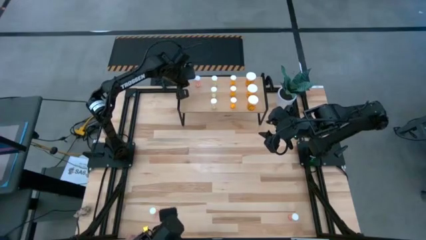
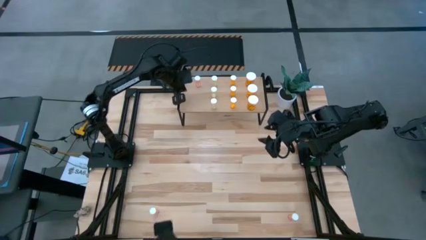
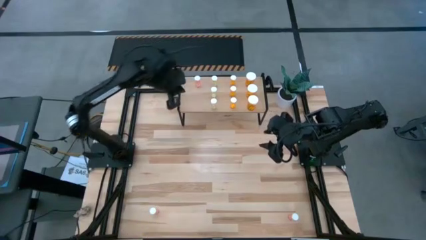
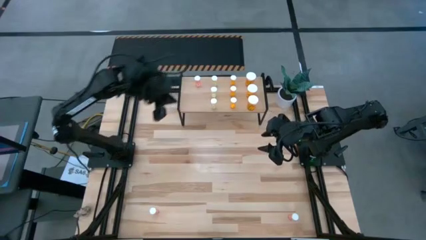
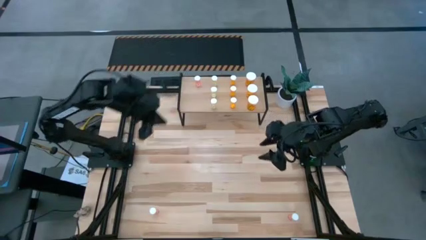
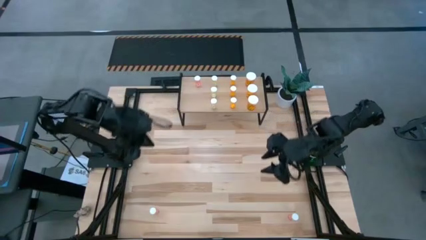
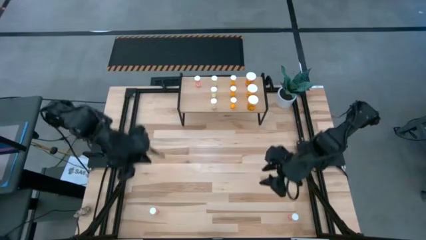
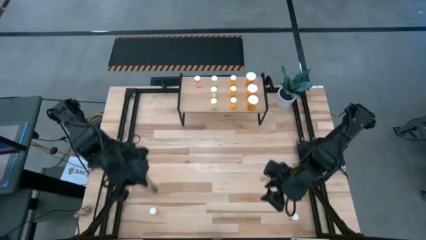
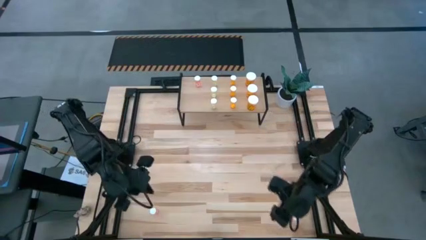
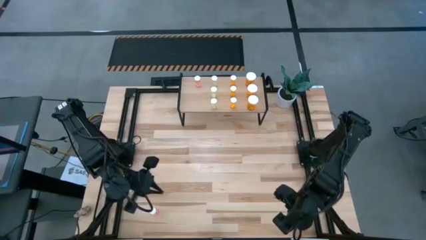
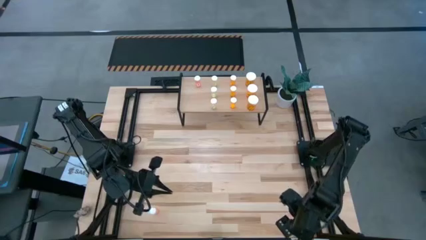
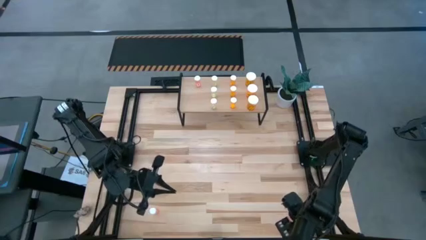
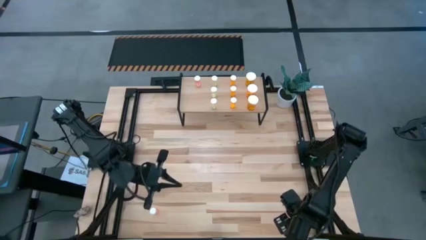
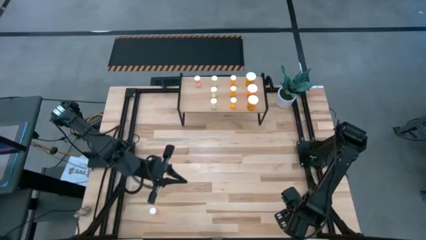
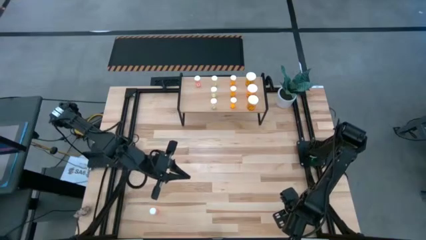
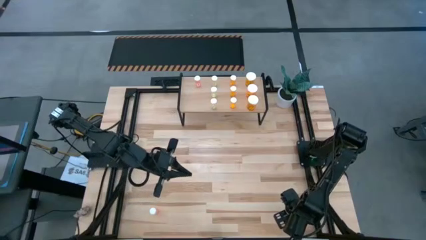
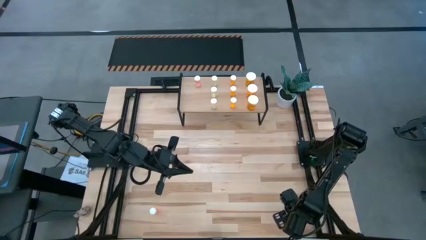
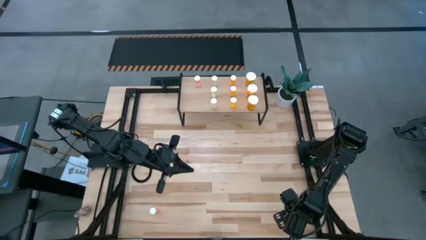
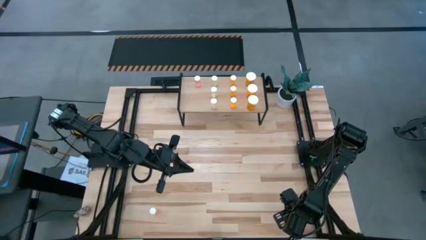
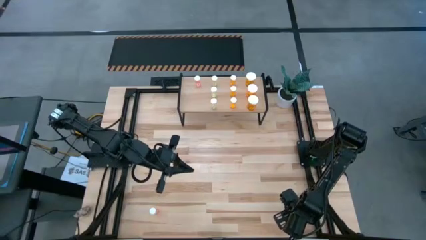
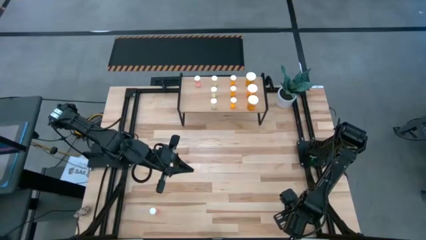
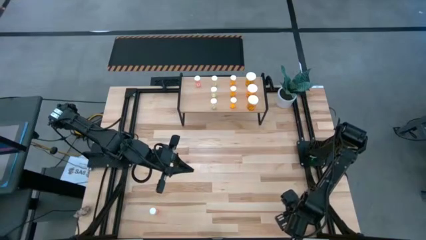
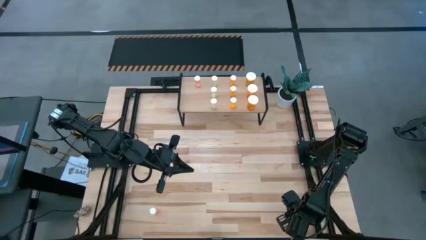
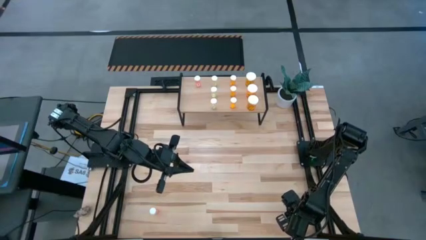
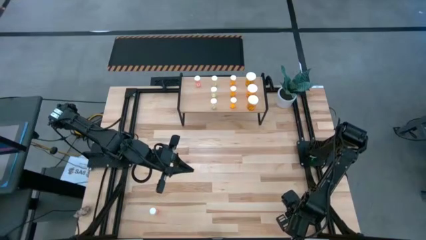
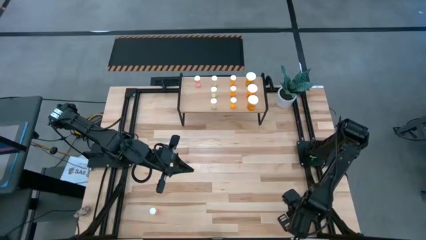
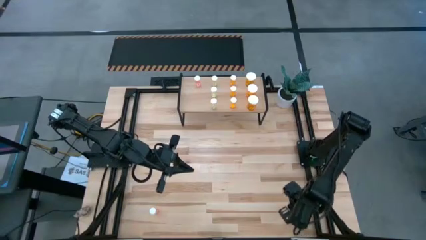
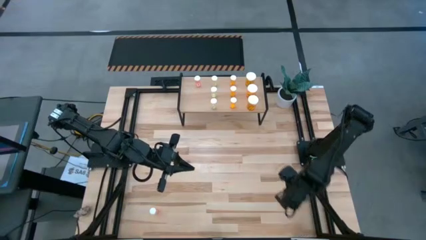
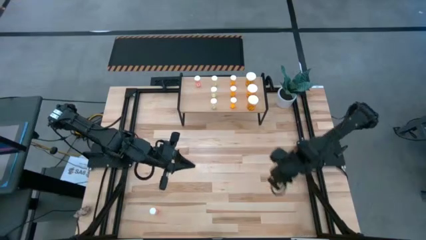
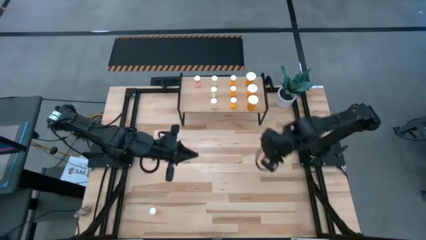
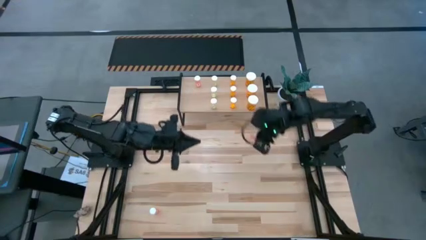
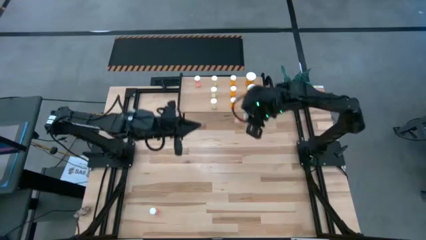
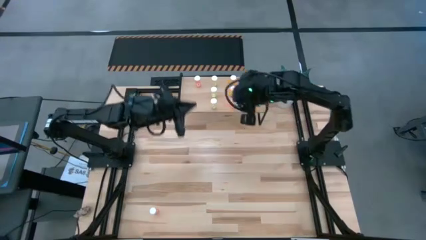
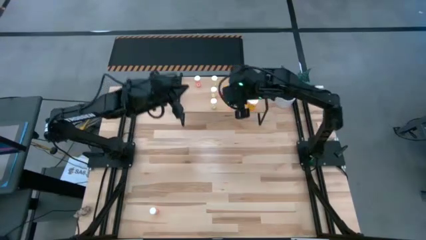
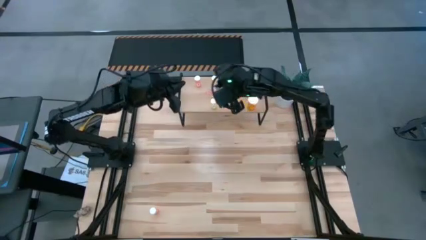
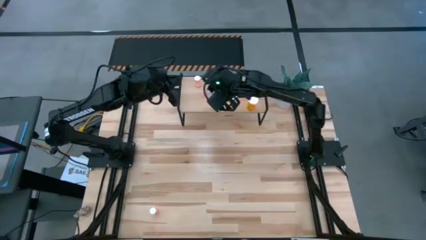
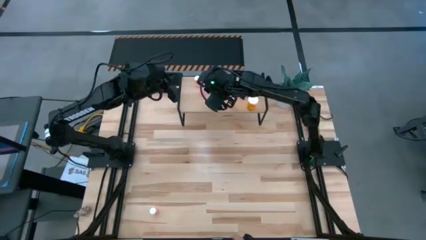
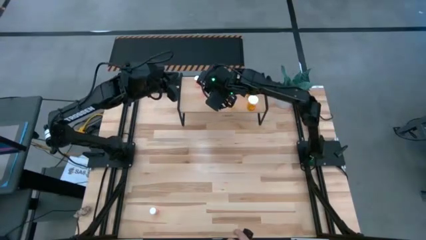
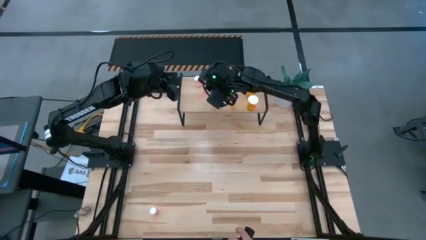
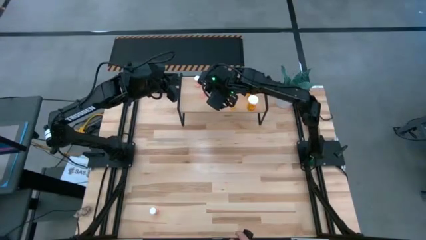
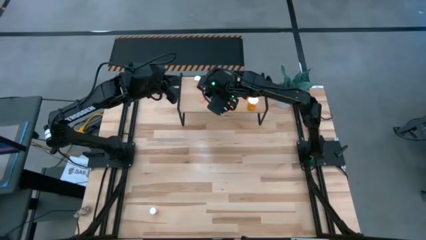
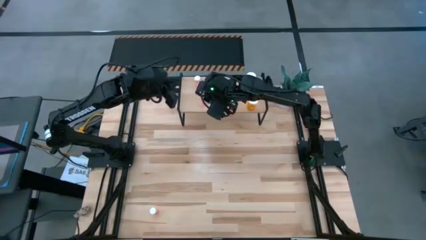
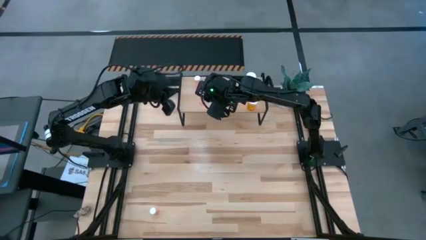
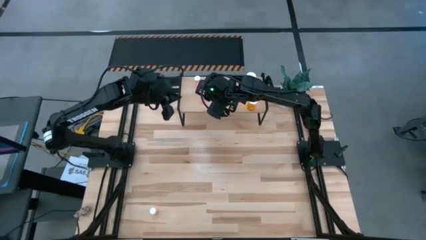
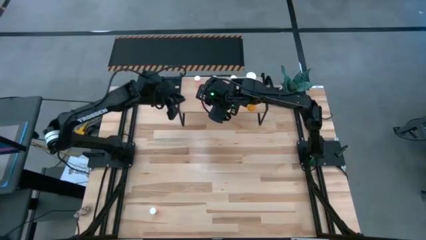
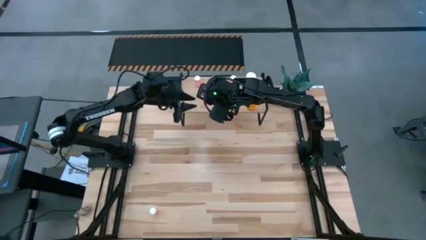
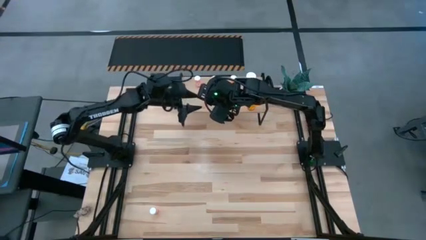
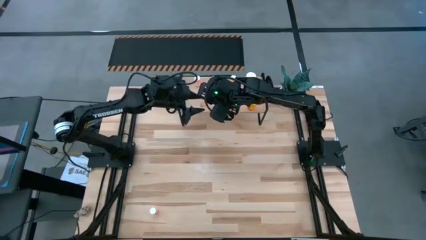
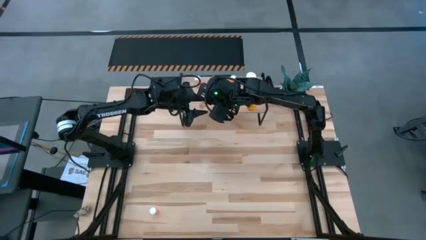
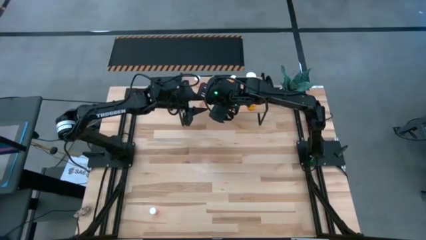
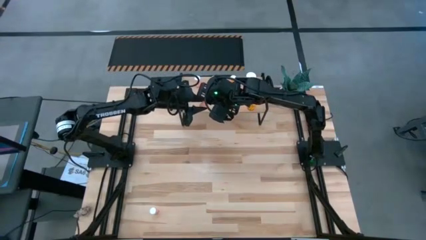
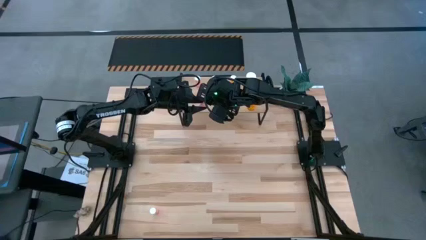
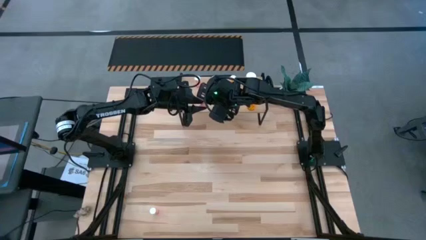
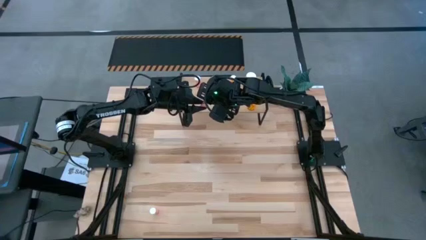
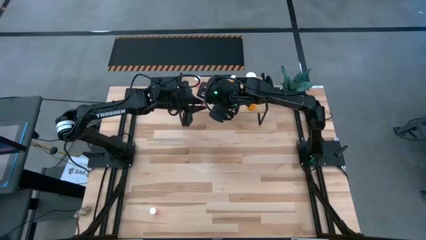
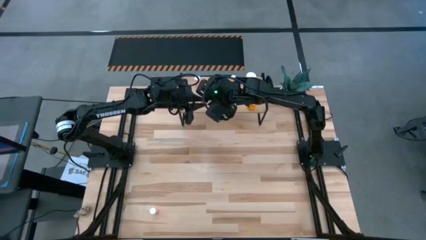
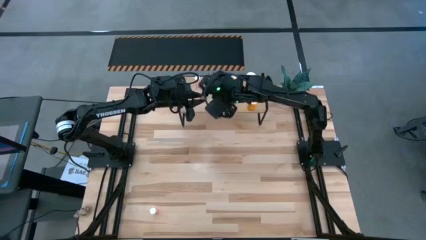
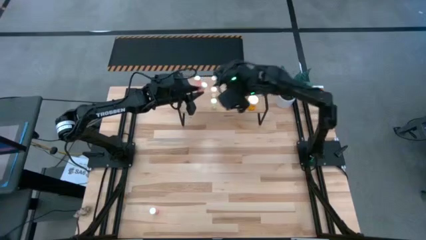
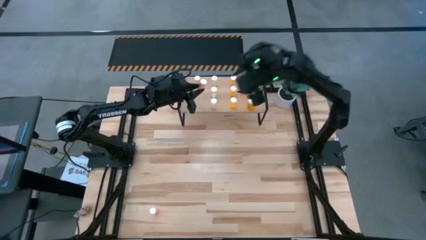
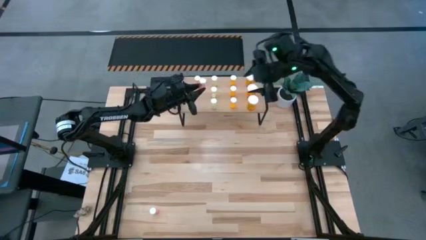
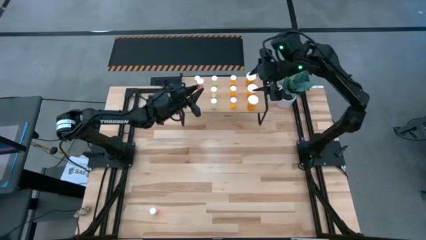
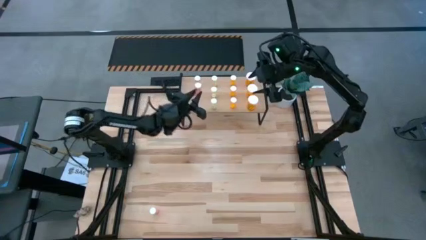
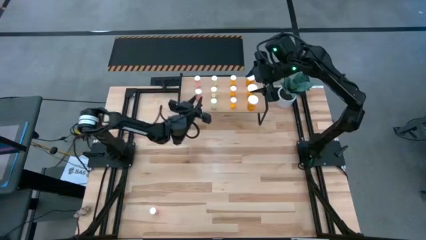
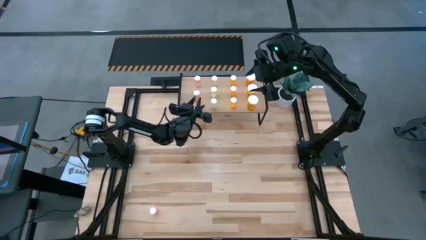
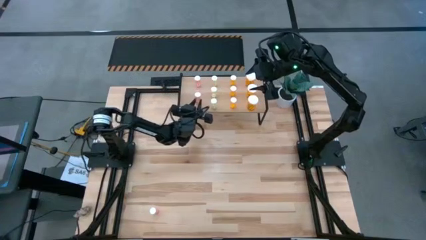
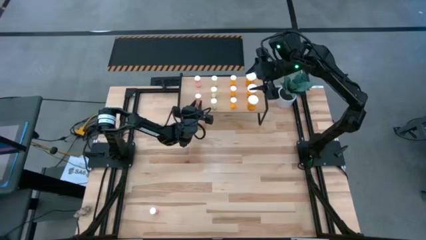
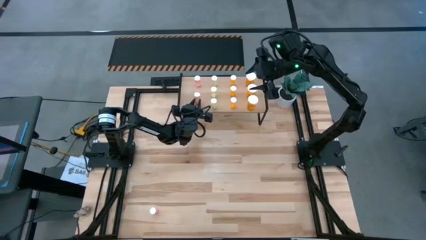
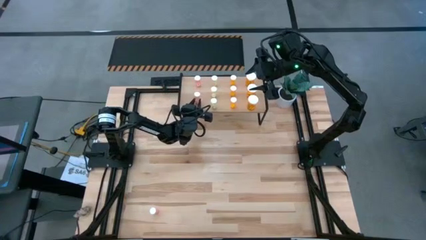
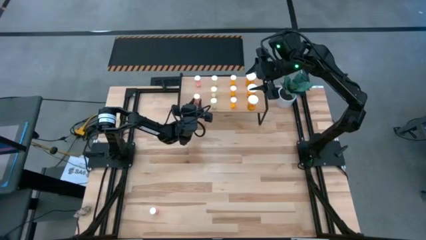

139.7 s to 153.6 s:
Task: Pick and place medicine bottles onto shelf by color
Put the right pink pill bottle on the shelf aligned with the other small pink pill bottle

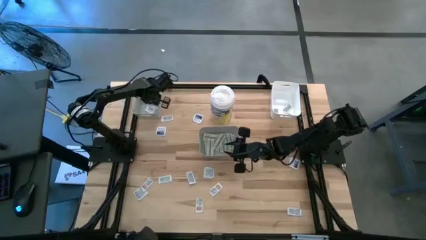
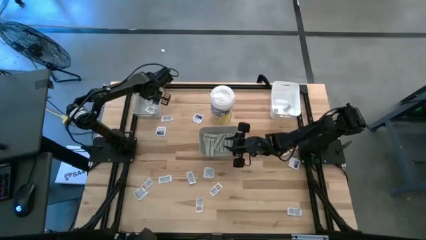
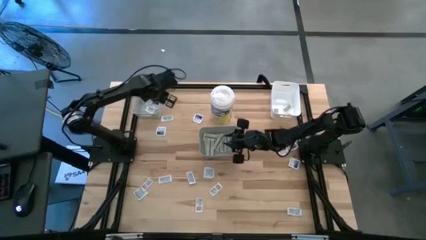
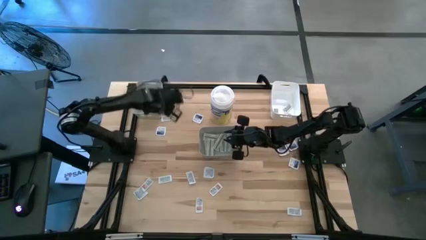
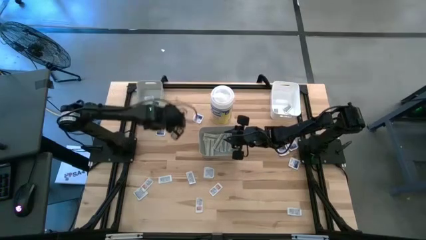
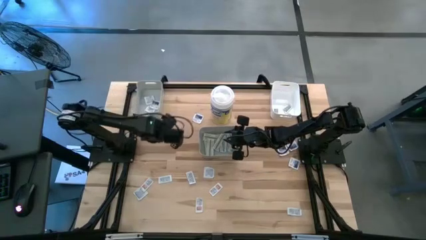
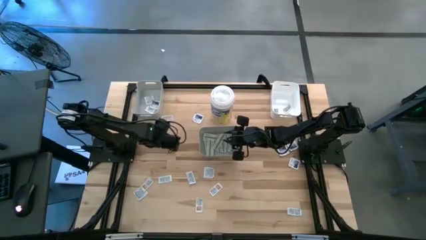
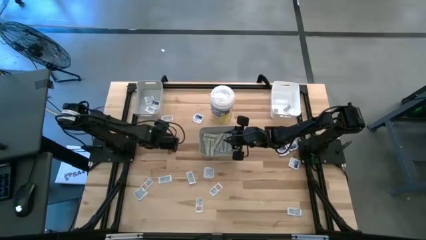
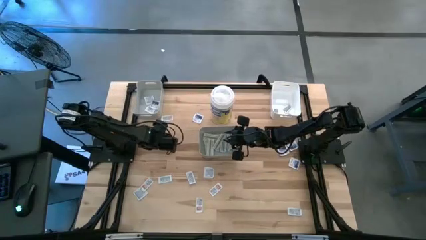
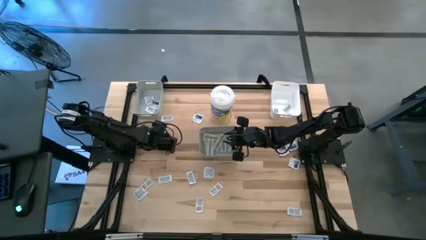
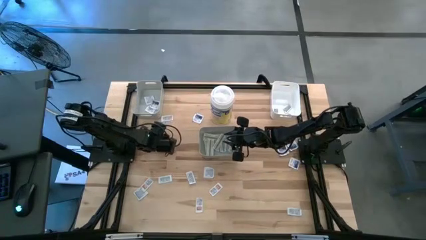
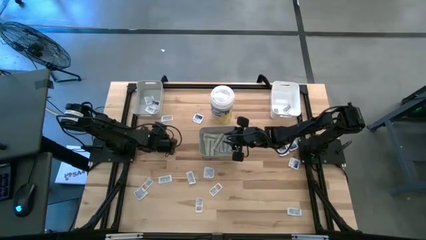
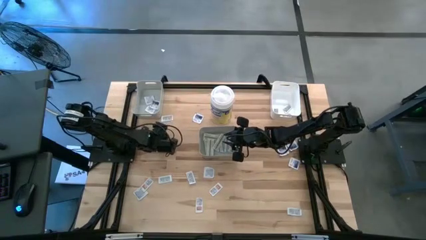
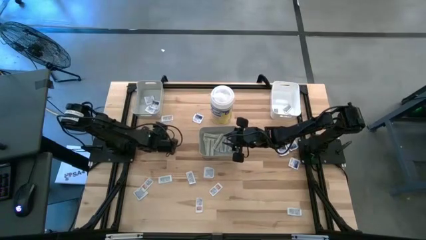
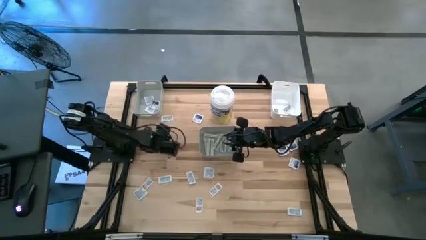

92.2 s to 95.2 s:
Task: Pick & Place First Aid Supplies
Put the alcohol pad into the top gray bin
